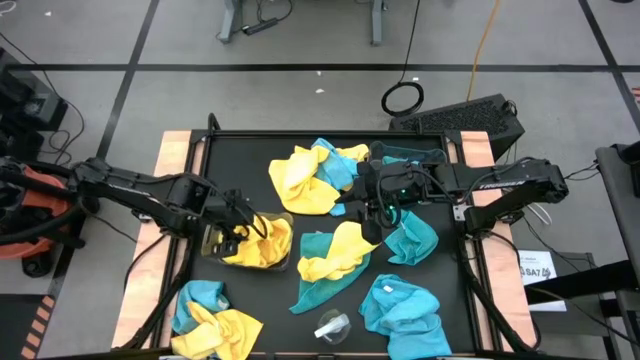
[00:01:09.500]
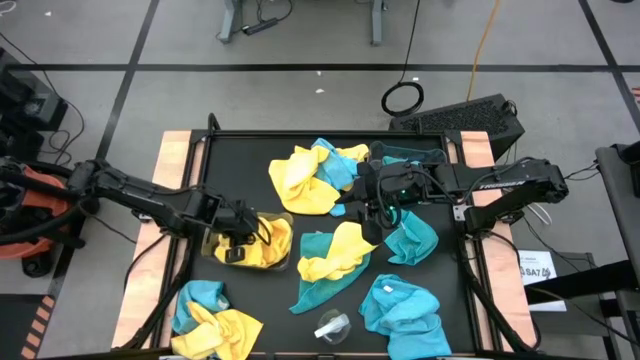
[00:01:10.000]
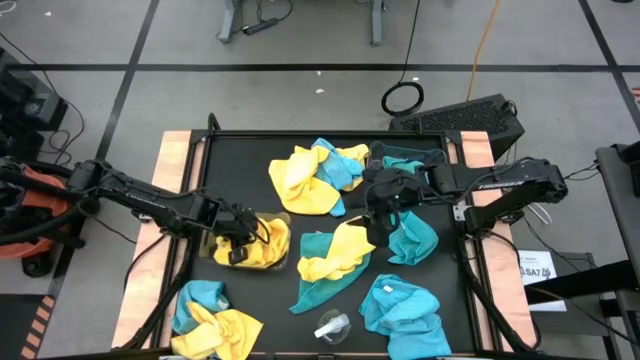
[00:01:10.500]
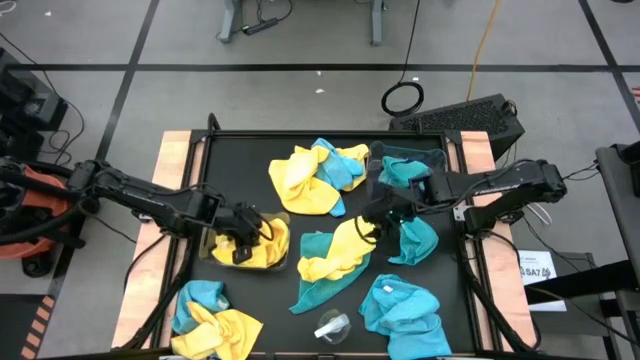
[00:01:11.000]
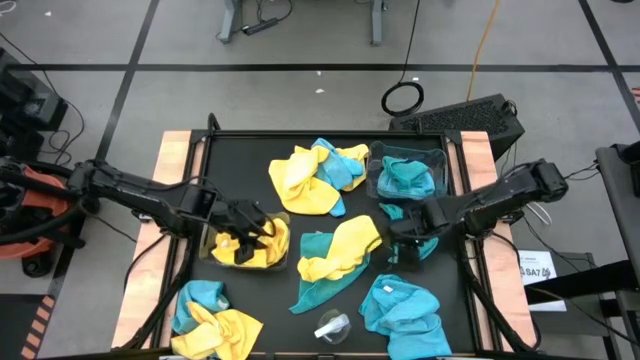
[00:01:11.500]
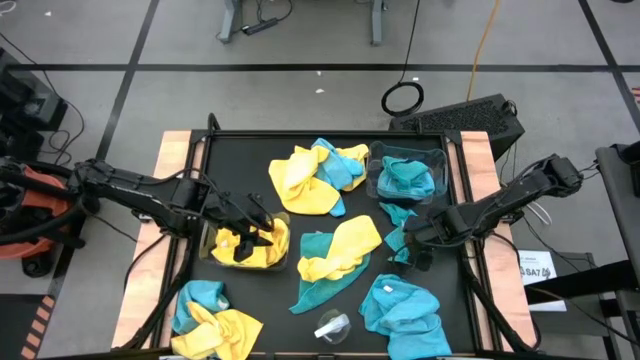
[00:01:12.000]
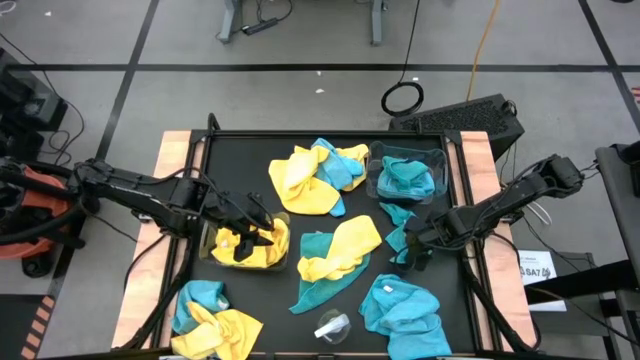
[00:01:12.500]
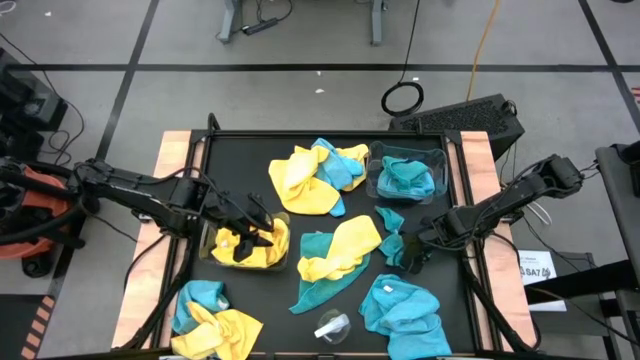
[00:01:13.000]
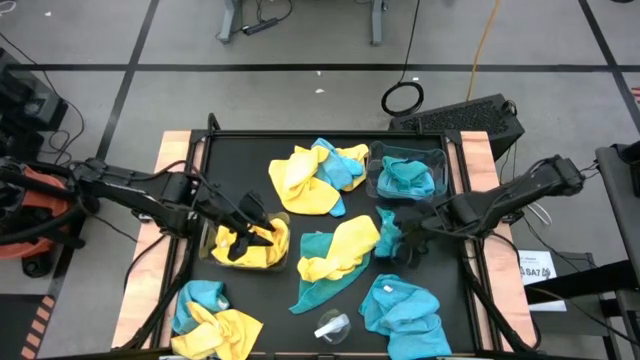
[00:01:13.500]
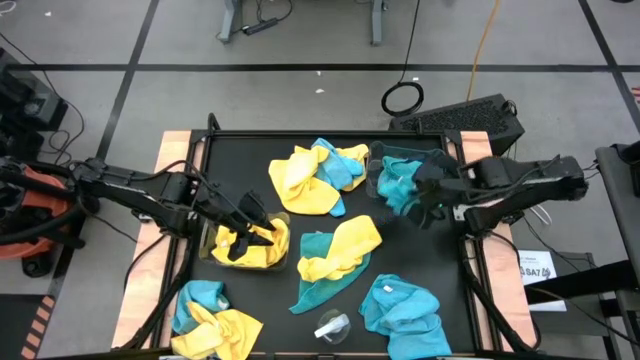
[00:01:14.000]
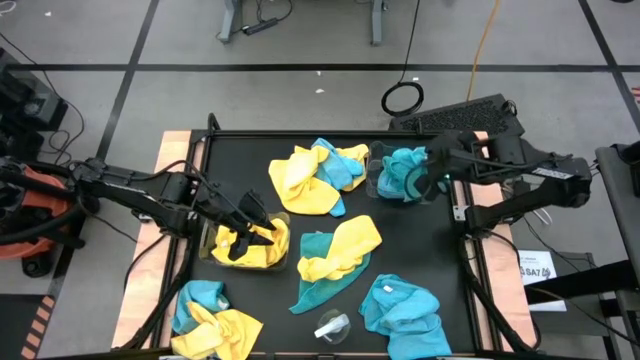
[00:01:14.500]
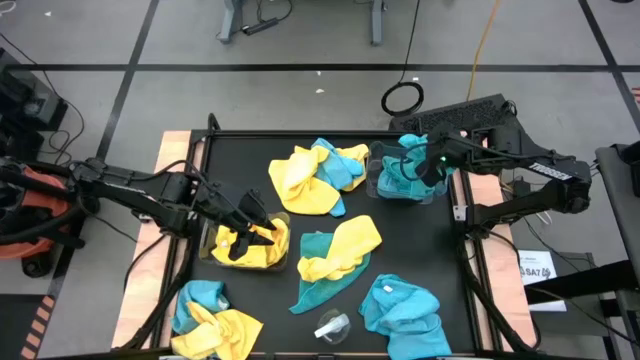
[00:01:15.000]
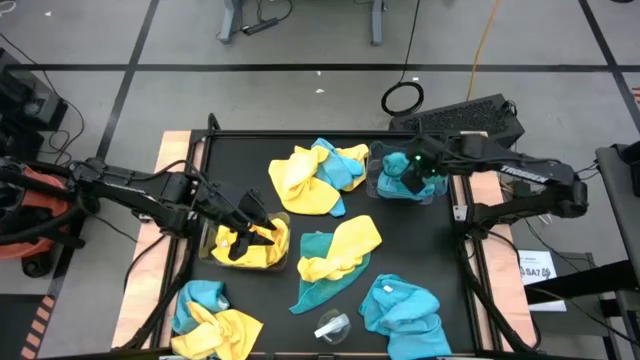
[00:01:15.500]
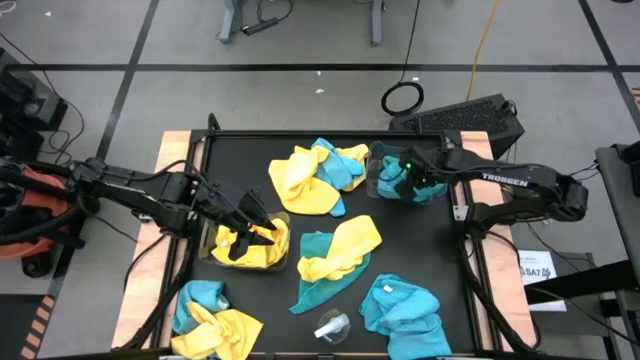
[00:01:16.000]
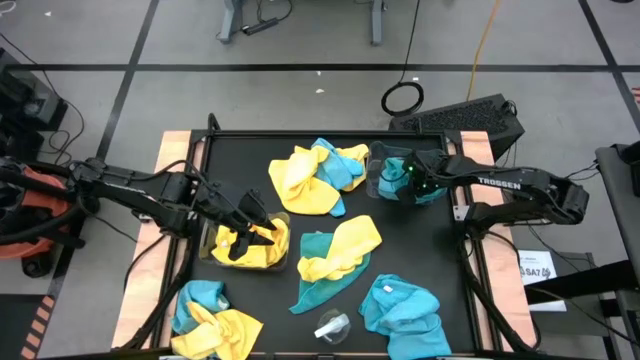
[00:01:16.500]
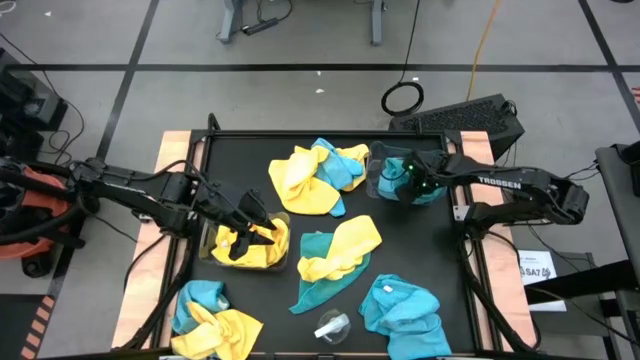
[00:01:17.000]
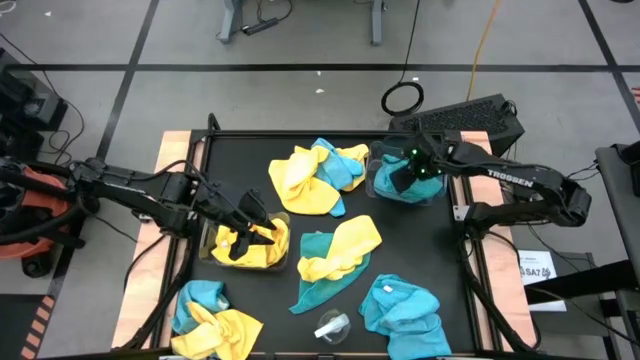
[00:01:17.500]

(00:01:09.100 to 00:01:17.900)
Task: Sort microfiber towel by color & place in baskets
Put the blue microfiber towel into the top transparent bin

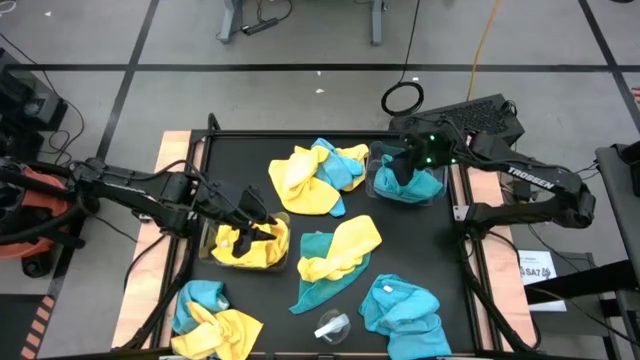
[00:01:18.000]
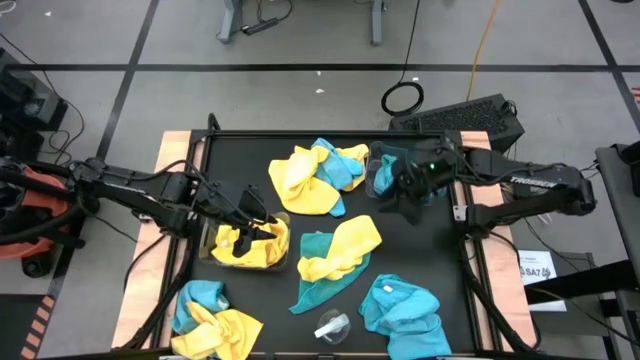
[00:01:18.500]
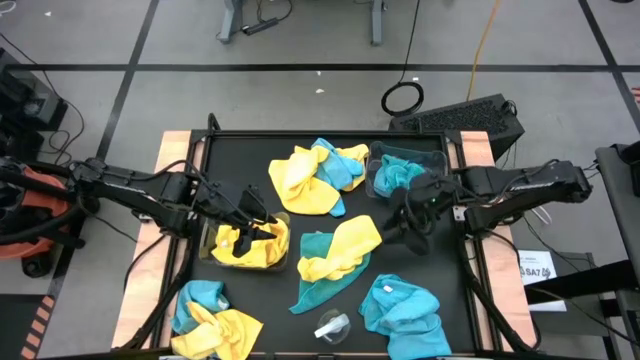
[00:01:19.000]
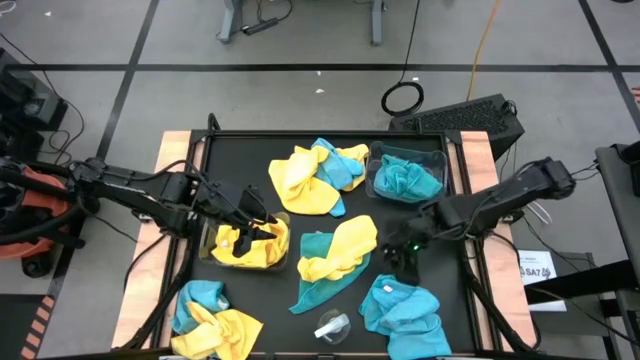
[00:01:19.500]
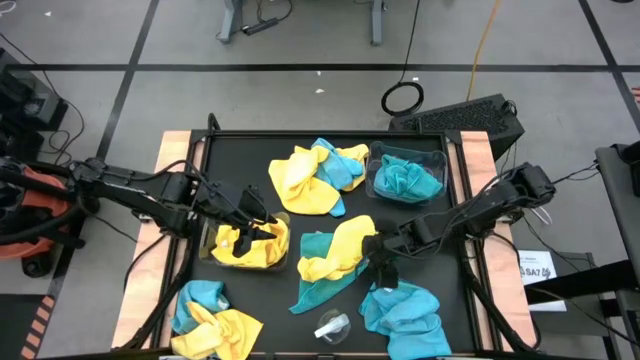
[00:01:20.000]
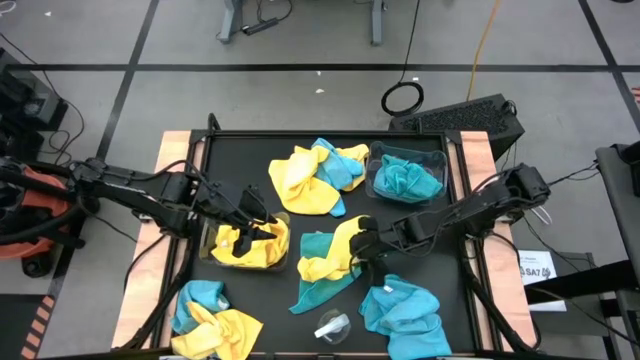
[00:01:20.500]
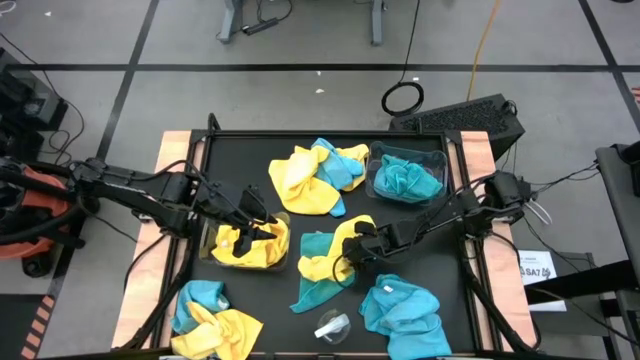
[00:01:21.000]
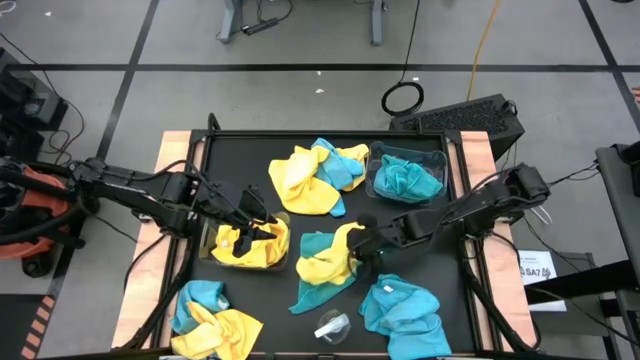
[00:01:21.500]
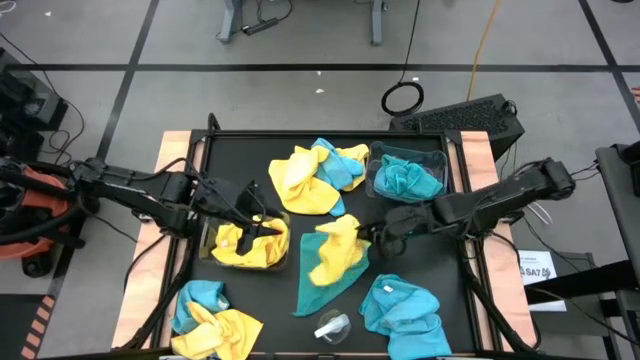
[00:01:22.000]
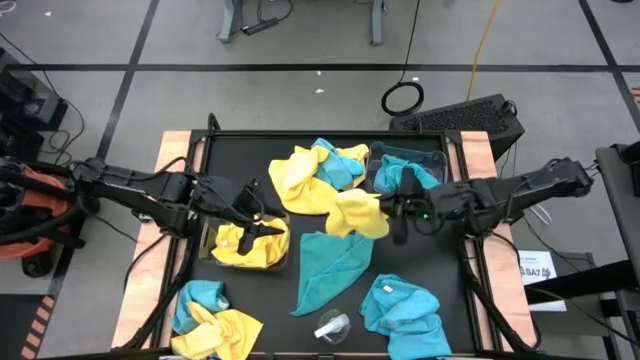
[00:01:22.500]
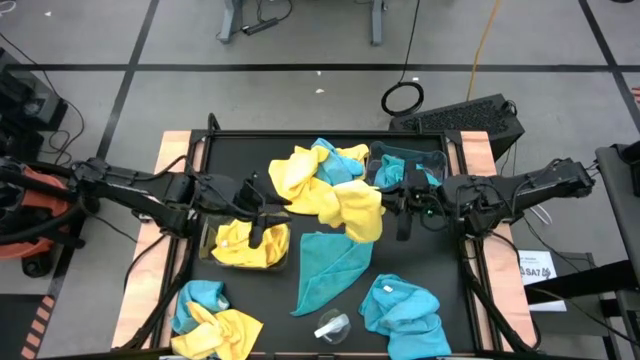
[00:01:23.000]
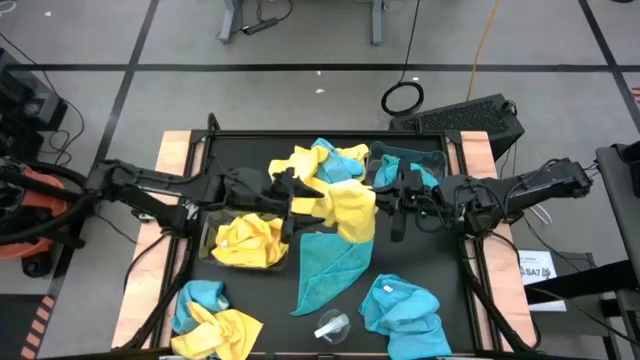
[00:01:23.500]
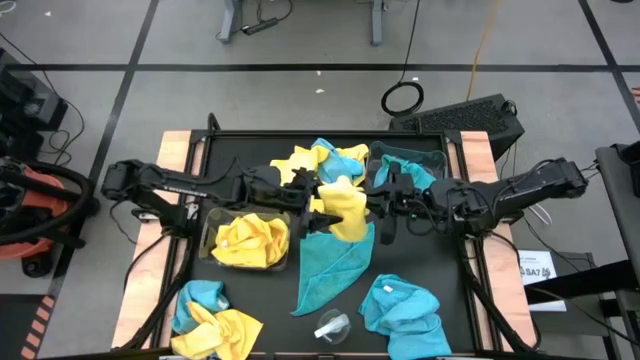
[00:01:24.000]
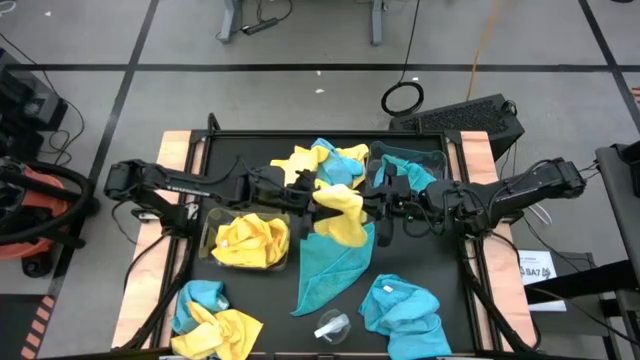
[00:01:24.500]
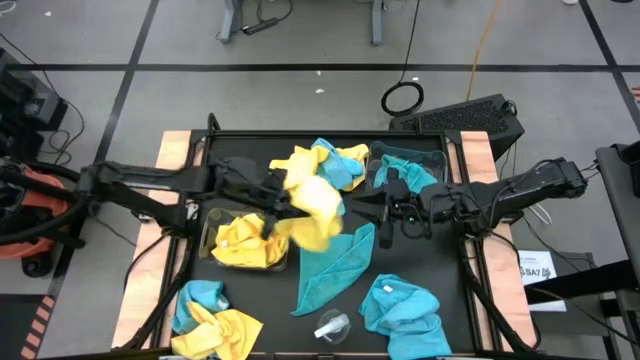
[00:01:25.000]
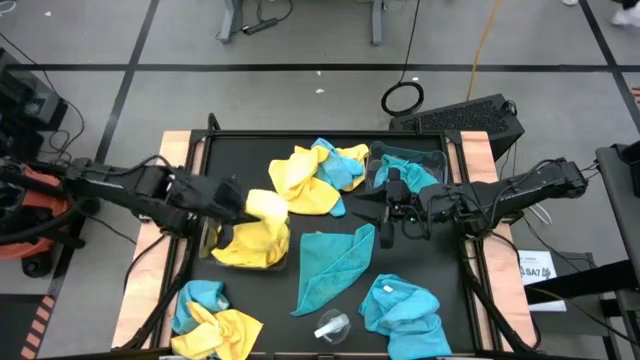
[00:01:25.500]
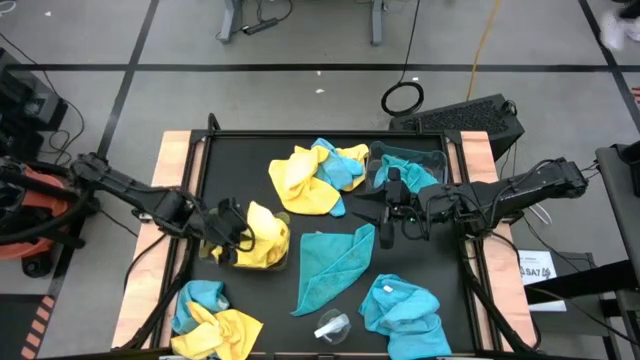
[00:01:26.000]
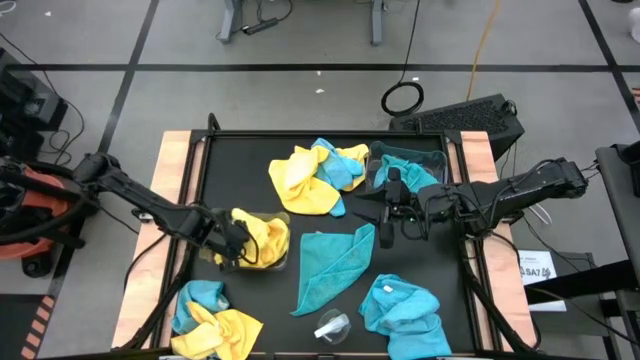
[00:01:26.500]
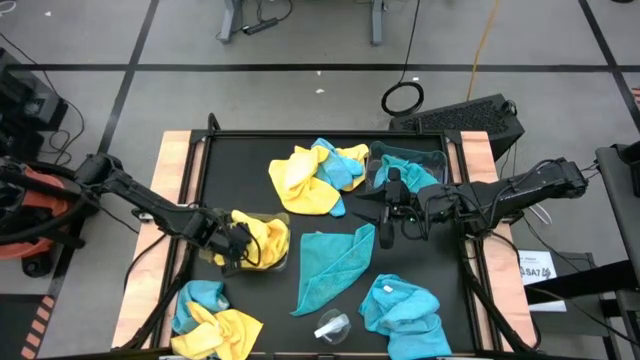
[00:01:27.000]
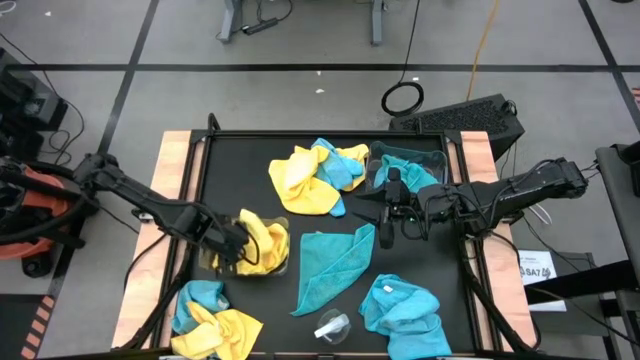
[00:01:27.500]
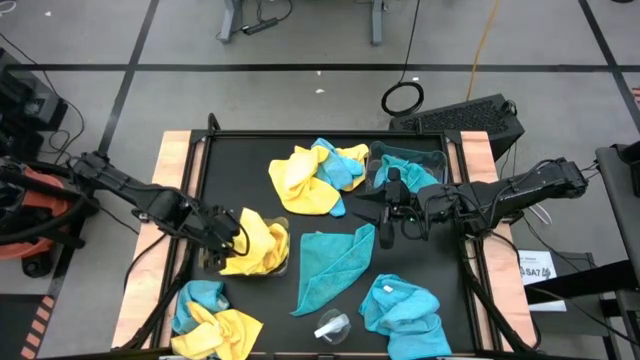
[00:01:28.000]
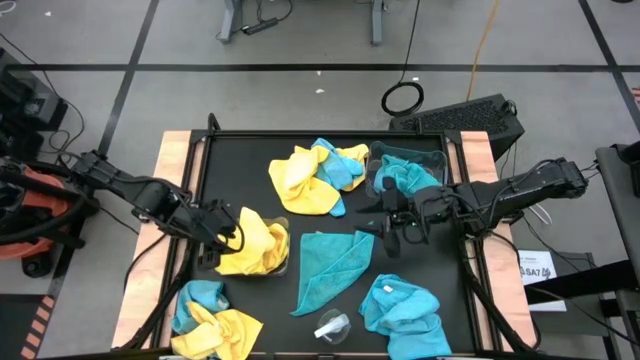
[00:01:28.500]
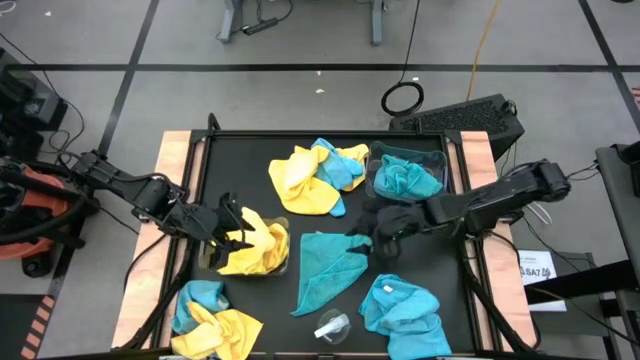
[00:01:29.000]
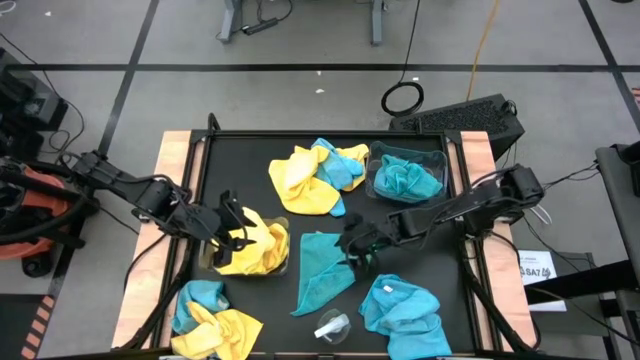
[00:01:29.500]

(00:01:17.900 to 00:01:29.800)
Put the yellow microfiber towel into the bottom transparent bin
